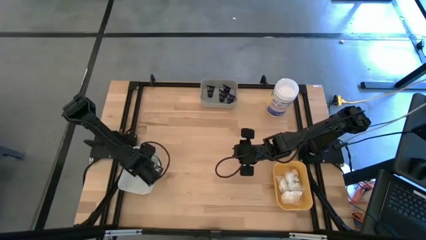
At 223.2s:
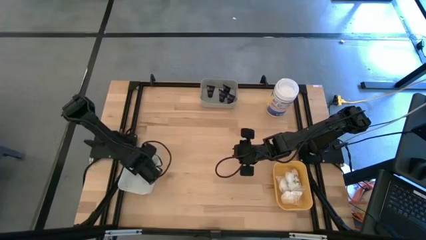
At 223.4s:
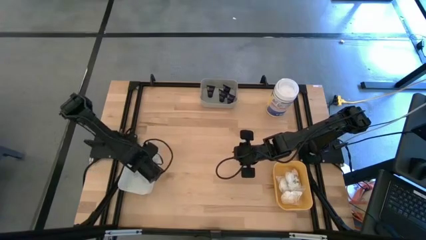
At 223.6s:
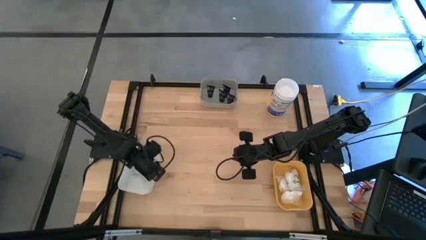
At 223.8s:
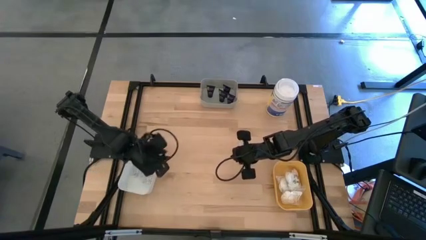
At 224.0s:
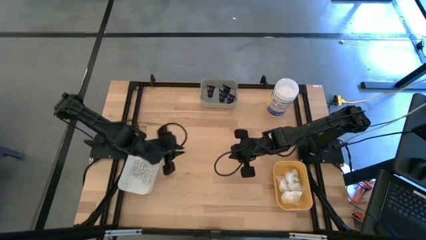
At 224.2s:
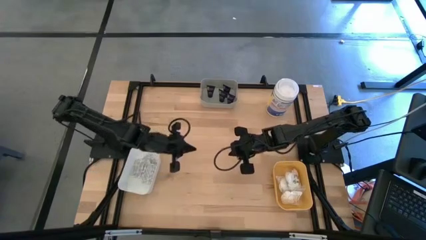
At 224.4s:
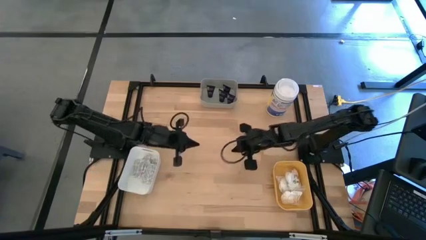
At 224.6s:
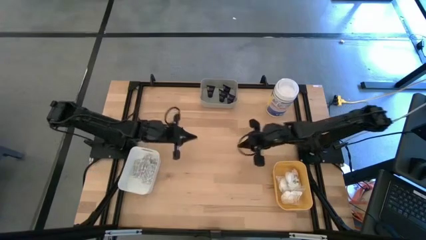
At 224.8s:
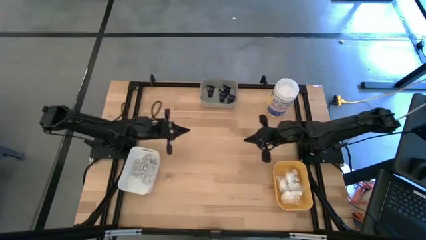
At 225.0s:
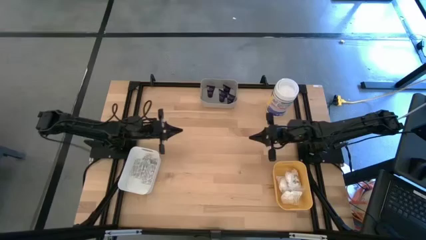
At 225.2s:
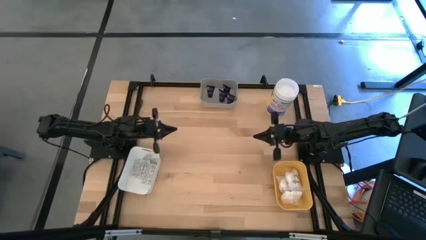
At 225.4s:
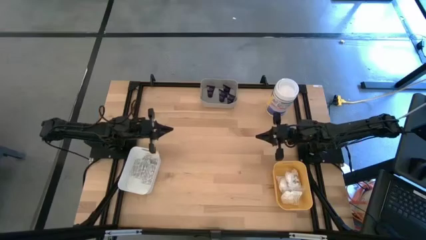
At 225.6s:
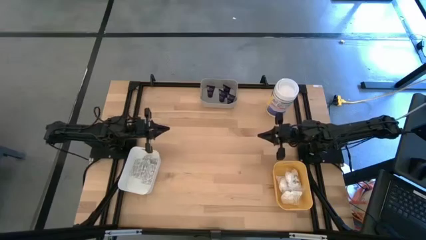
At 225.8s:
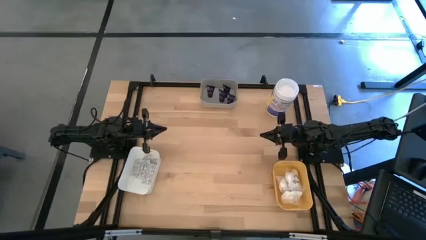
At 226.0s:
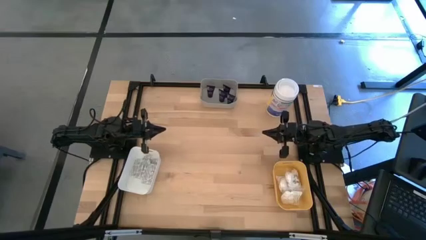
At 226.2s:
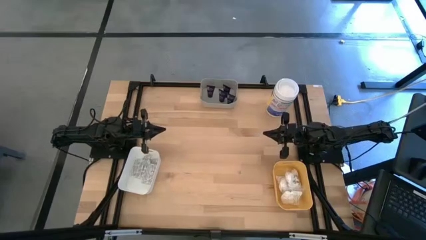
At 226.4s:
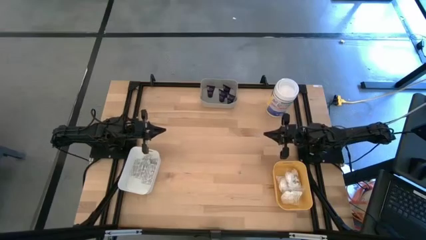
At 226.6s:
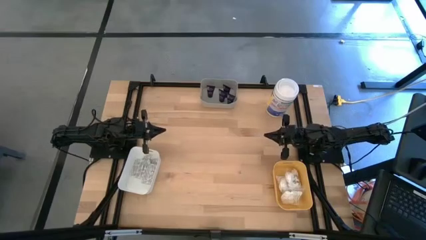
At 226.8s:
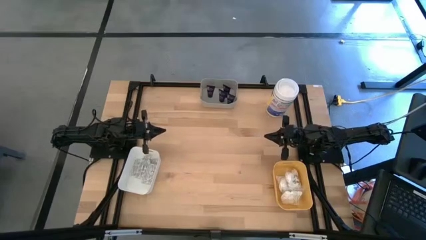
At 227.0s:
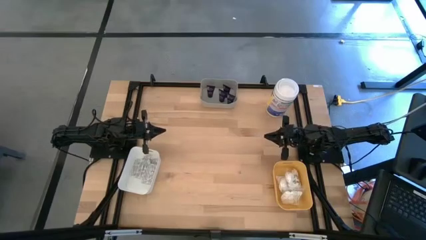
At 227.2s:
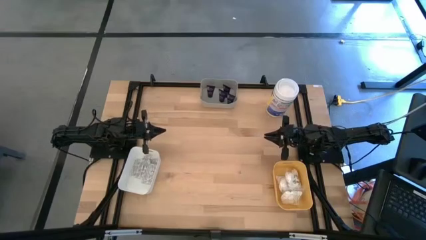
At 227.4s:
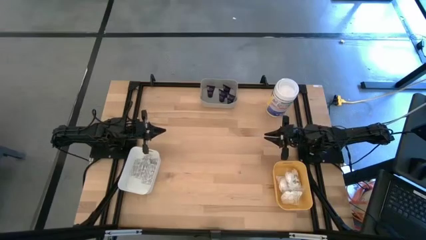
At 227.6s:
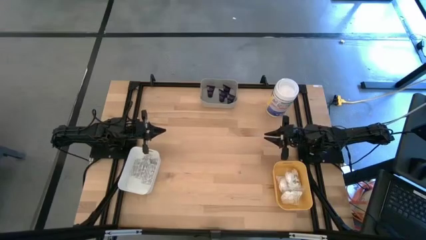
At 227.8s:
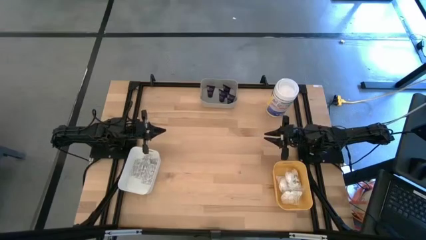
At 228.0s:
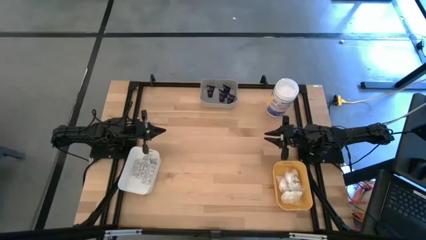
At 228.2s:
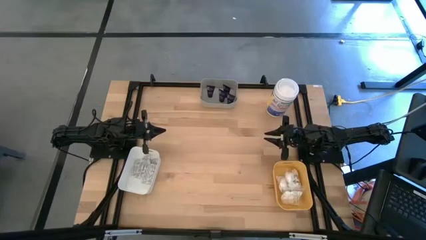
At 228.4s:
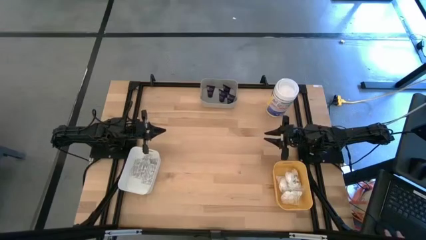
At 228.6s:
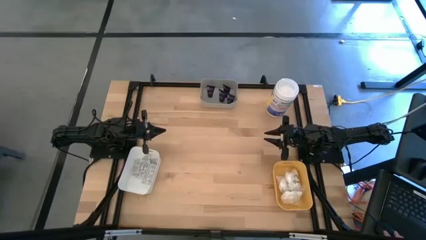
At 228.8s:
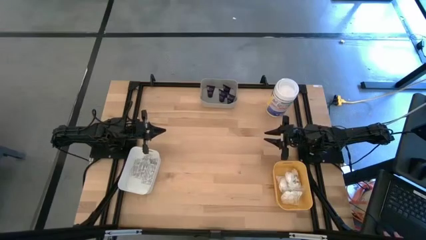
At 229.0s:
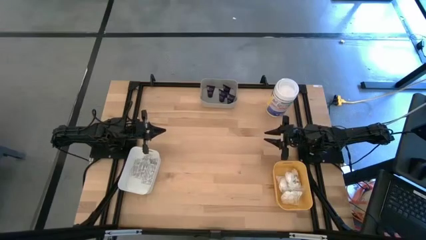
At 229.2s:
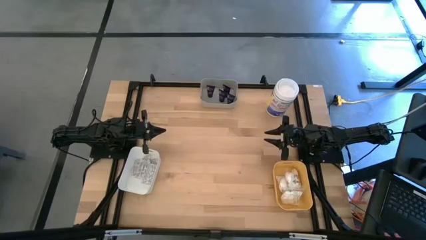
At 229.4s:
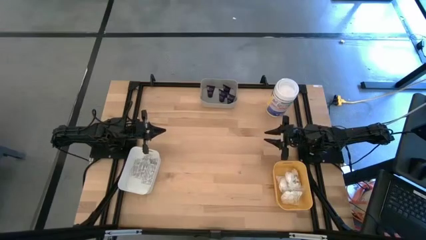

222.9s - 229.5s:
Task: Pick & Place Travel size toiletries
Return to Home Position

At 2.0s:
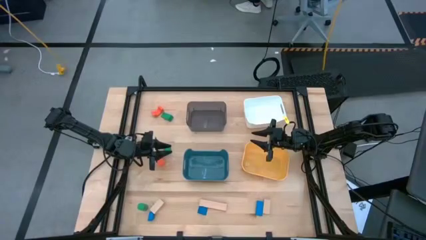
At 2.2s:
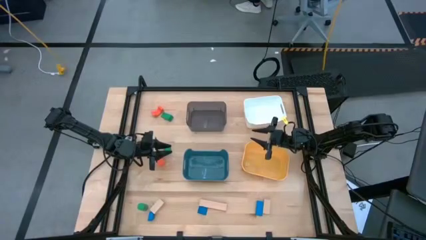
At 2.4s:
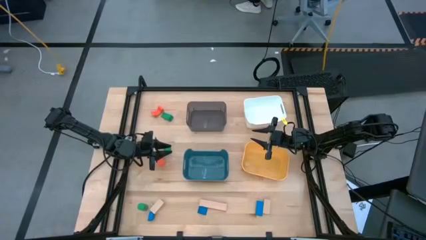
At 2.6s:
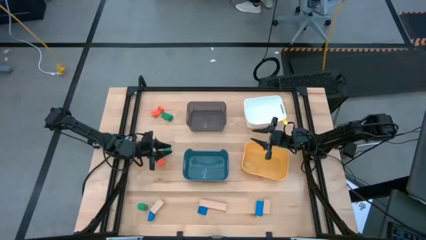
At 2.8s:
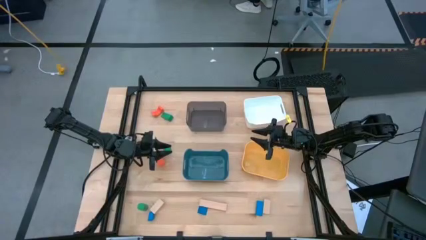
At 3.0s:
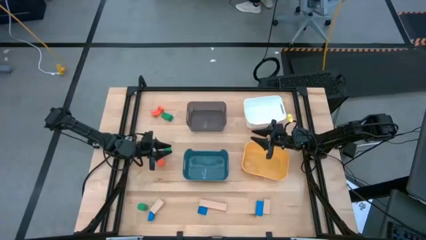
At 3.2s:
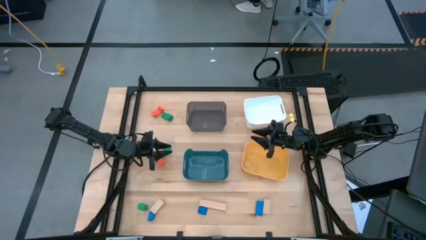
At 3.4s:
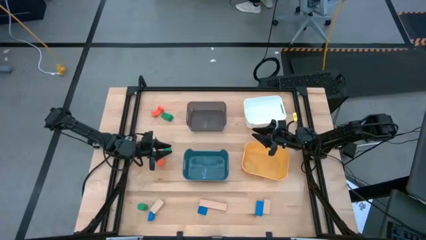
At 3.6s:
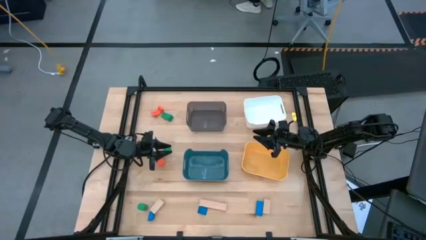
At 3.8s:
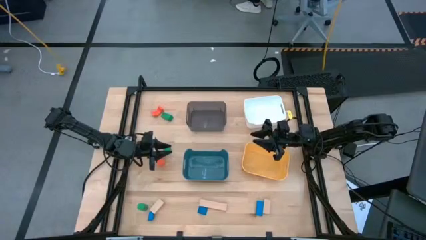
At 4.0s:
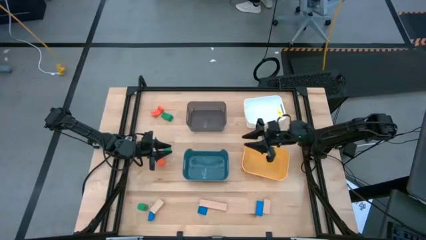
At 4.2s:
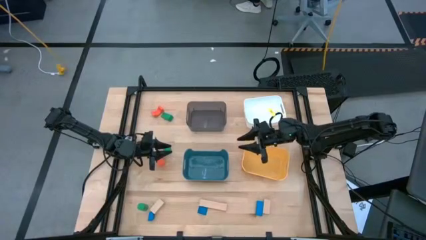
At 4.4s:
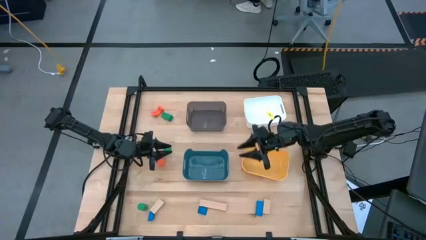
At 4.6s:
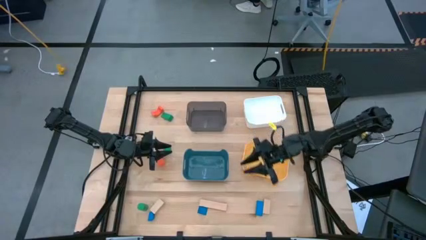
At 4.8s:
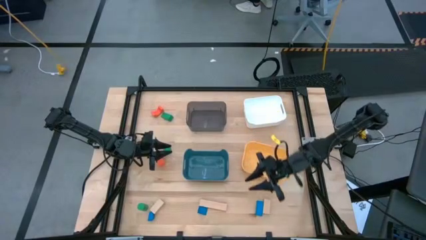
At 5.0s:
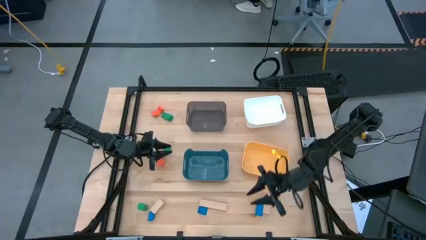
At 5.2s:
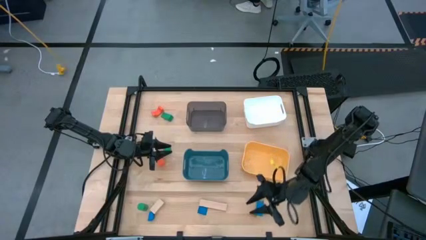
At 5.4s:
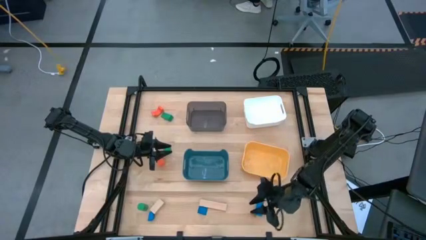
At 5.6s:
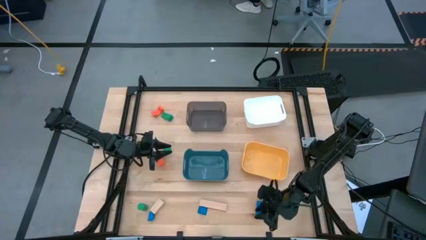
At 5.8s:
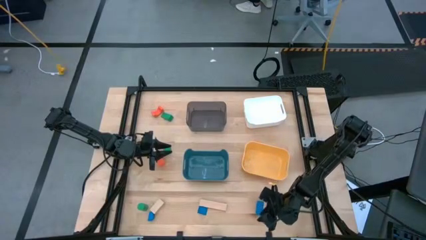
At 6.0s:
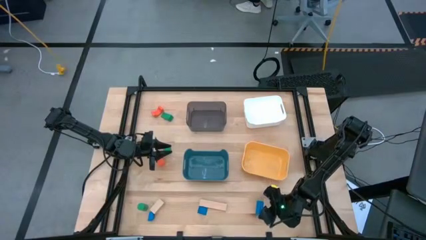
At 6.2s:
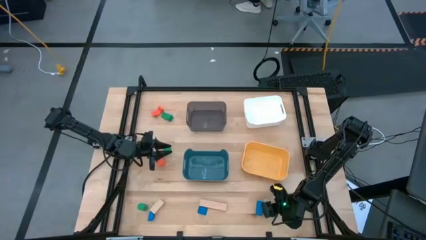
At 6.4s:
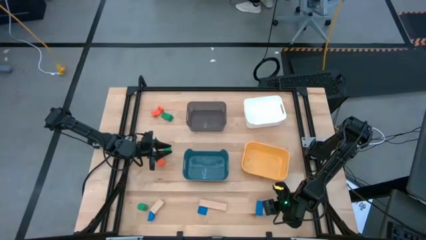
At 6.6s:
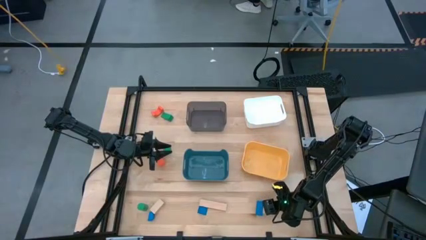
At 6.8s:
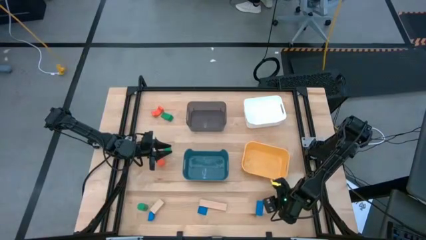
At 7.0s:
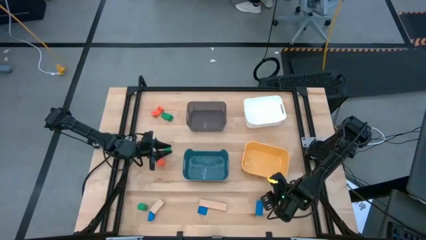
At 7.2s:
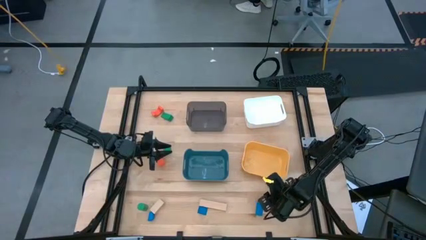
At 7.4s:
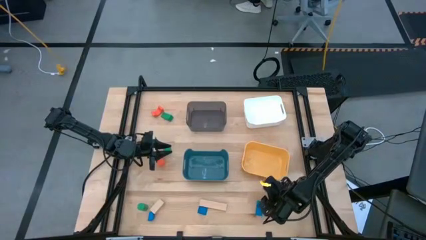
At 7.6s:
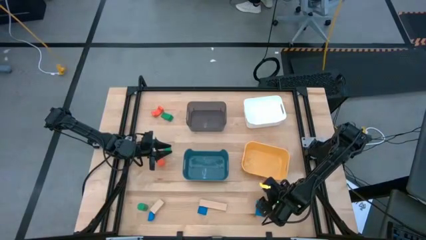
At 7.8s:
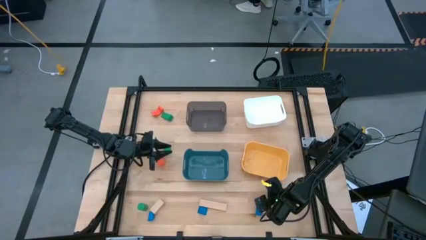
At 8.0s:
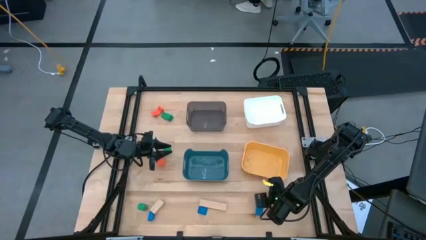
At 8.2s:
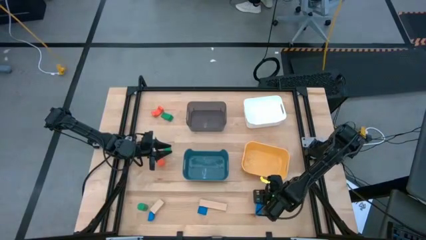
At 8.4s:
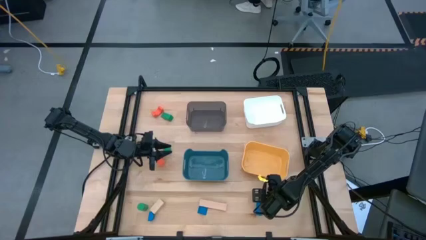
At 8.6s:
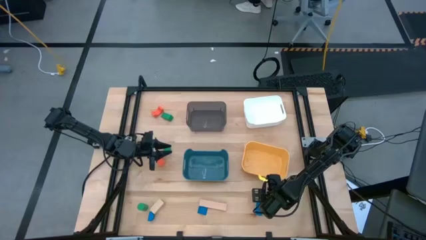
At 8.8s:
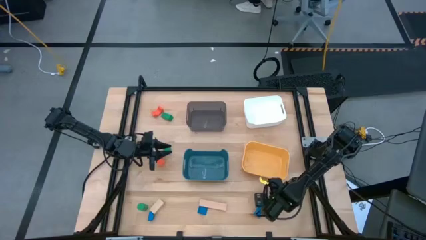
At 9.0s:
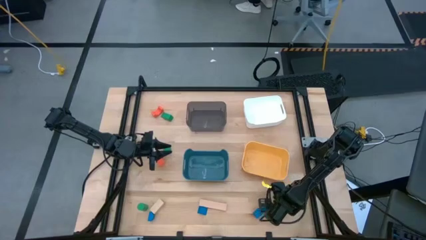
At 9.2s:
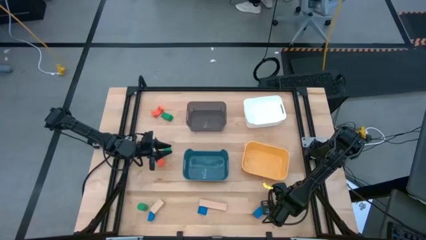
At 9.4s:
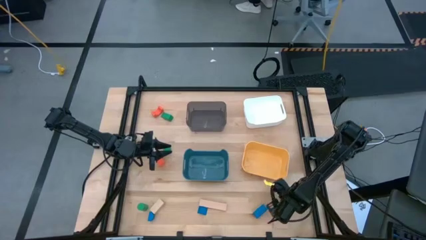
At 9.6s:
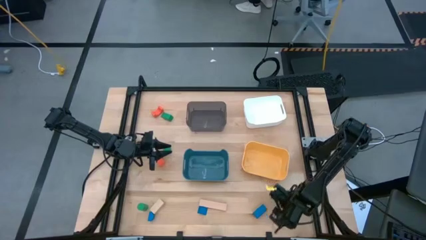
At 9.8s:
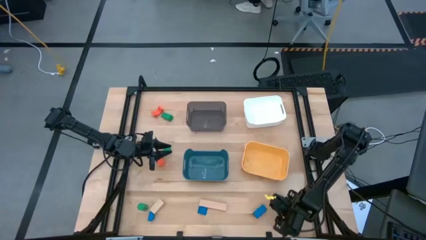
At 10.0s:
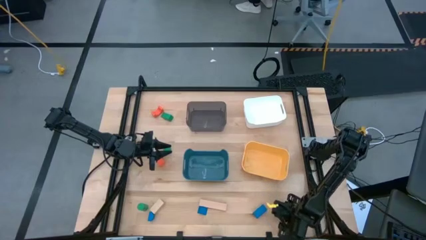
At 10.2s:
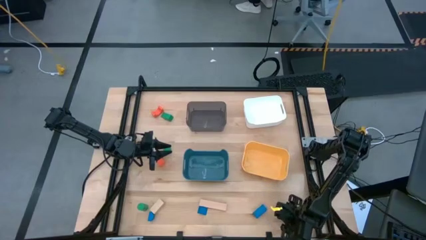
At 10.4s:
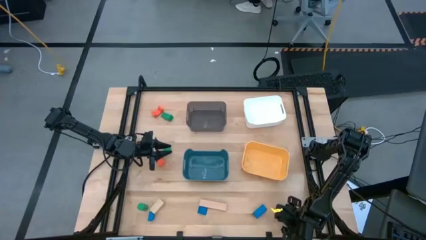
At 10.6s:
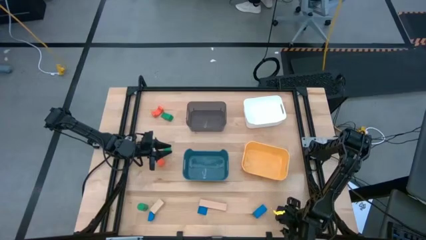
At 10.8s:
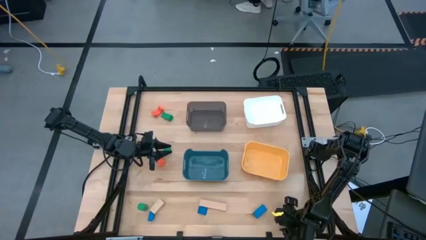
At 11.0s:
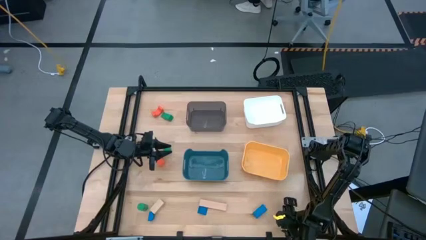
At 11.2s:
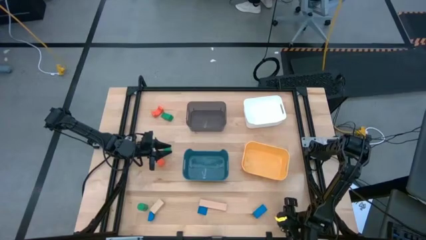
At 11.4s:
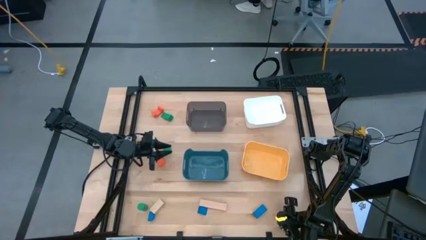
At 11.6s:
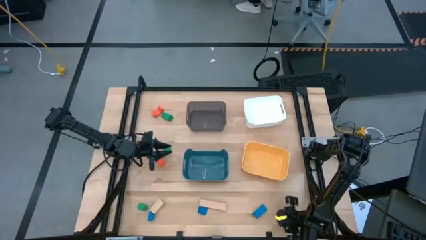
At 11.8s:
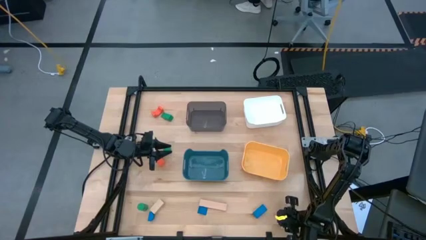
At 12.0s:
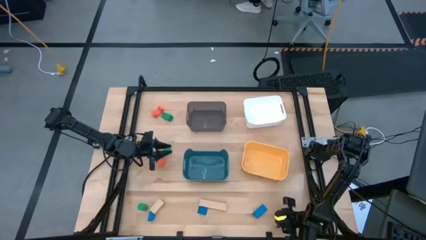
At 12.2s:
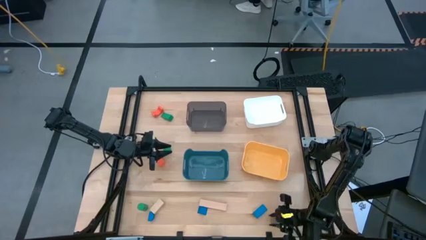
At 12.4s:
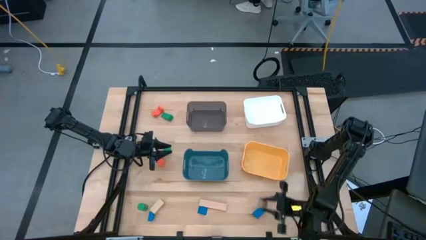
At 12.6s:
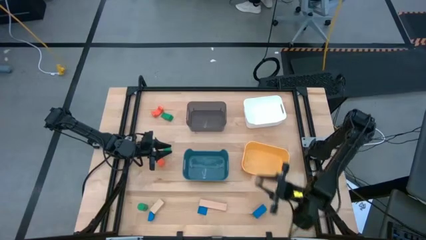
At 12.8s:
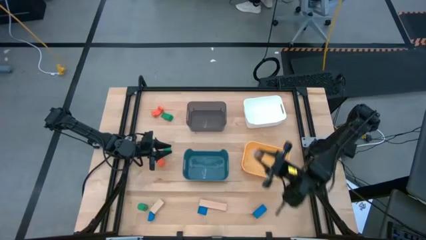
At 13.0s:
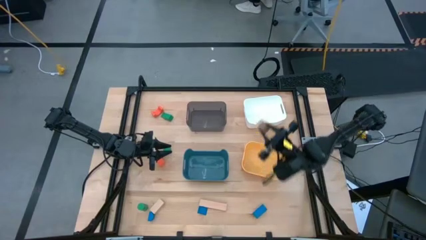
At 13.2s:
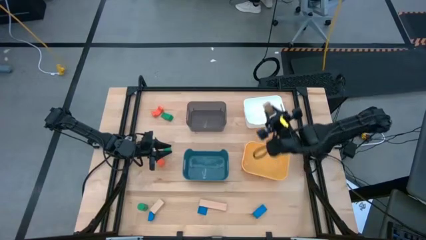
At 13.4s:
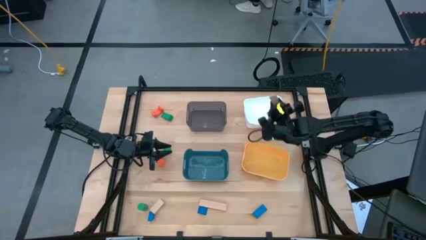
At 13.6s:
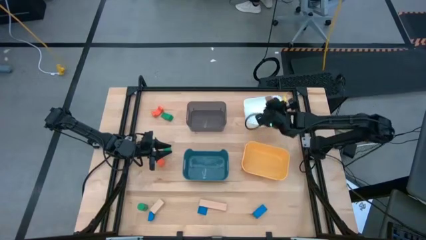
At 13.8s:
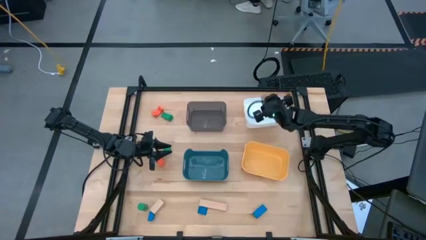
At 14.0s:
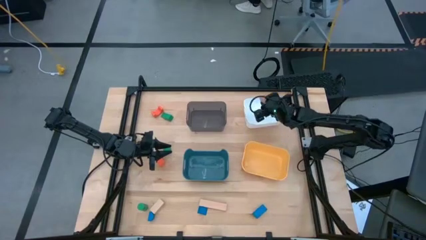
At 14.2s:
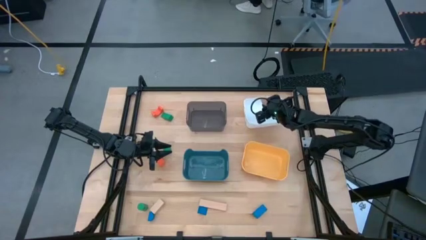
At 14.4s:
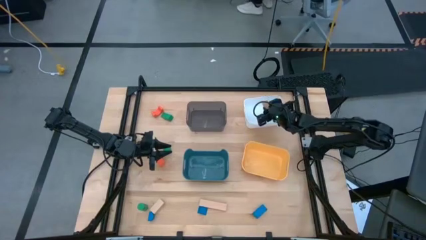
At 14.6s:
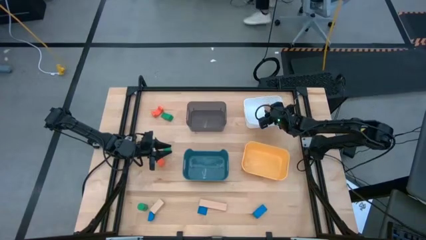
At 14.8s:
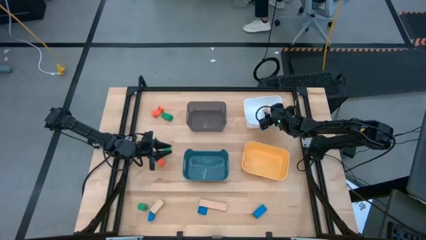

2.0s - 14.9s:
Task: Sort & place blocks by color
Put the right brown block into the white bin
